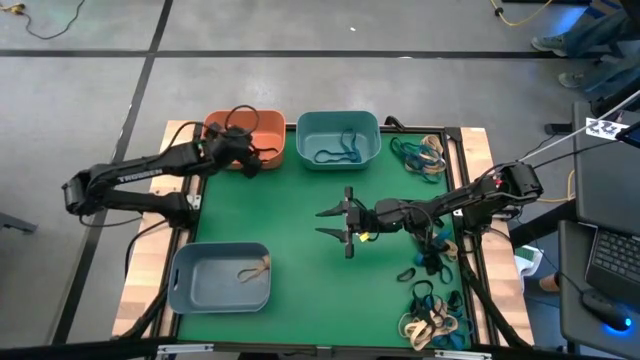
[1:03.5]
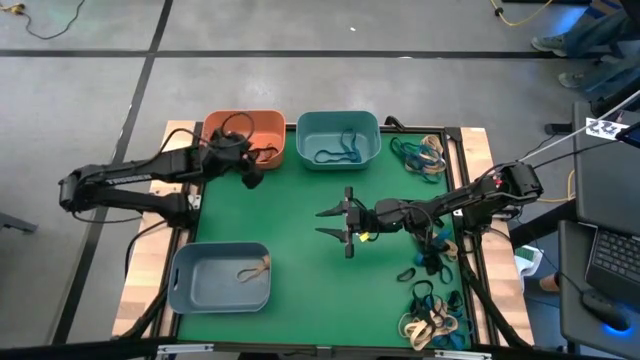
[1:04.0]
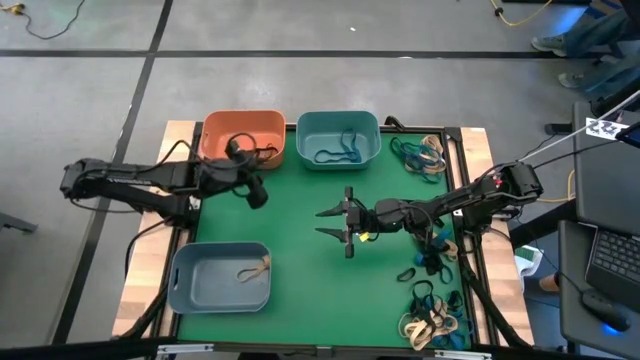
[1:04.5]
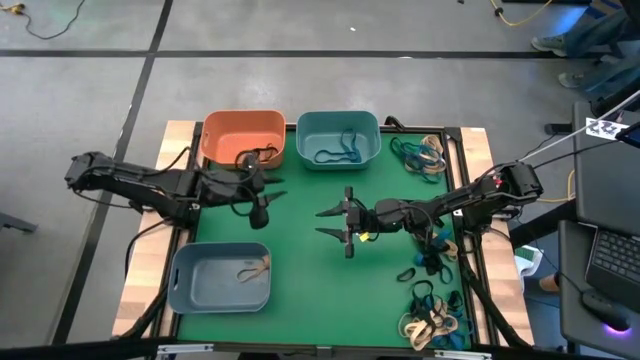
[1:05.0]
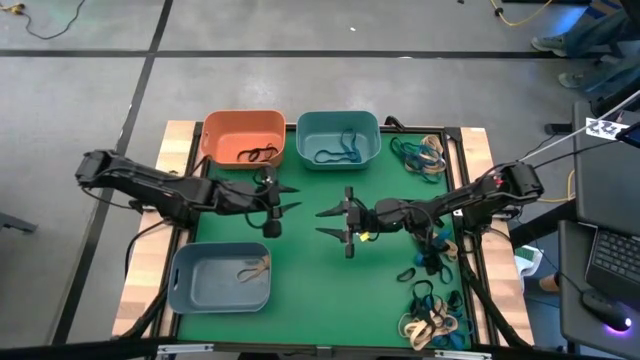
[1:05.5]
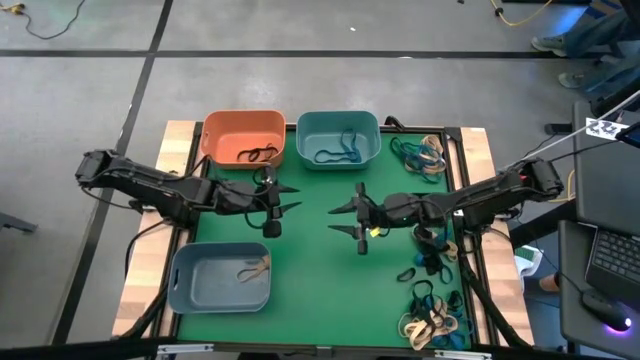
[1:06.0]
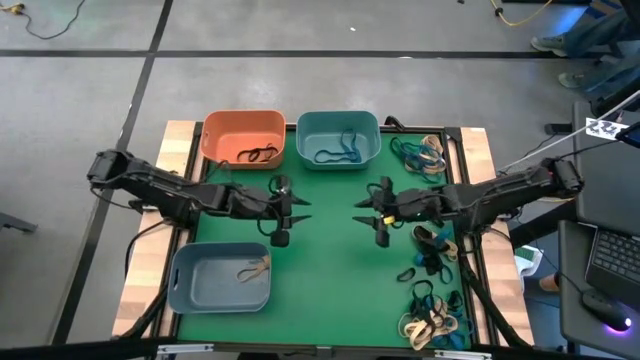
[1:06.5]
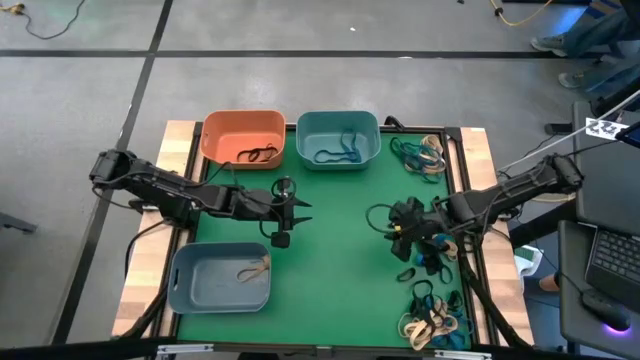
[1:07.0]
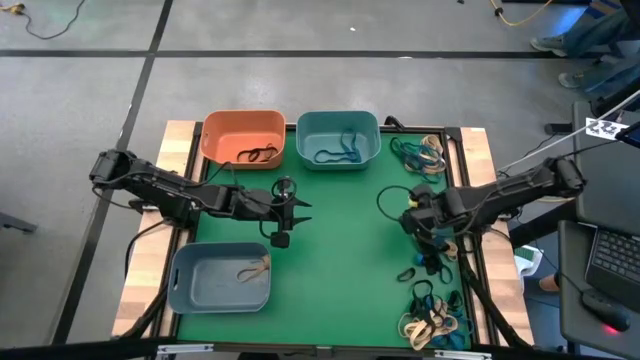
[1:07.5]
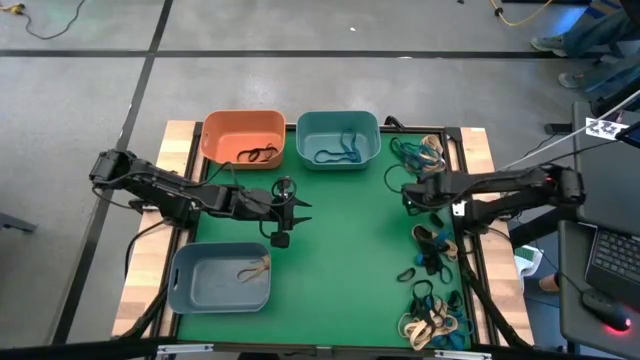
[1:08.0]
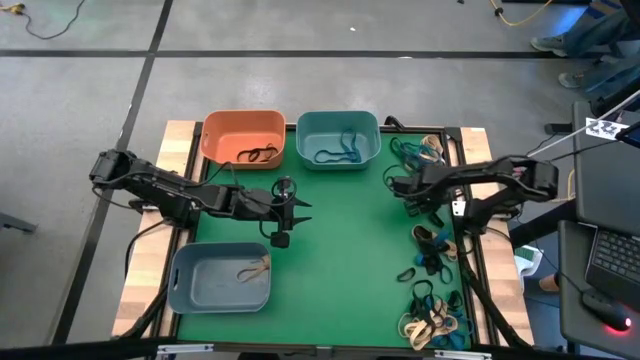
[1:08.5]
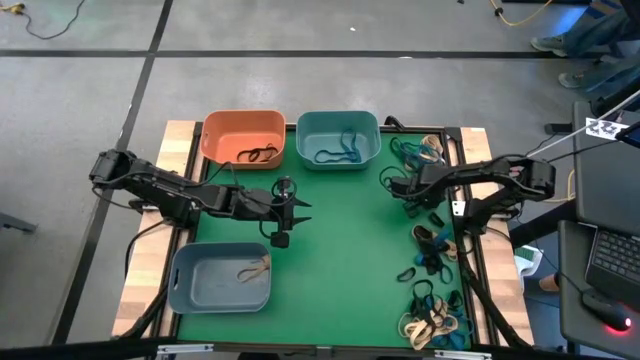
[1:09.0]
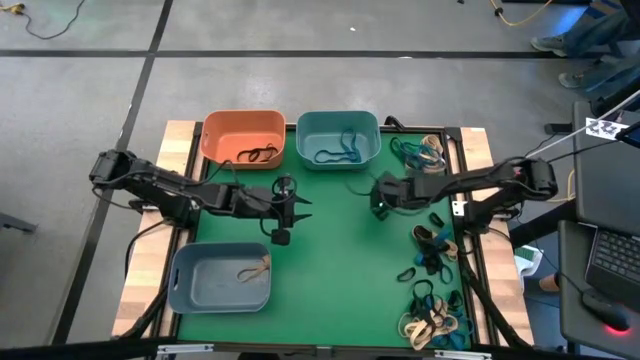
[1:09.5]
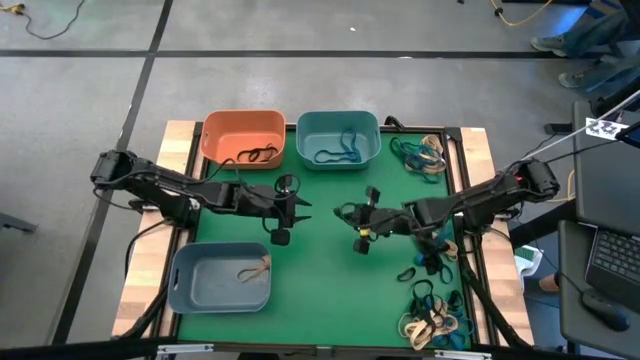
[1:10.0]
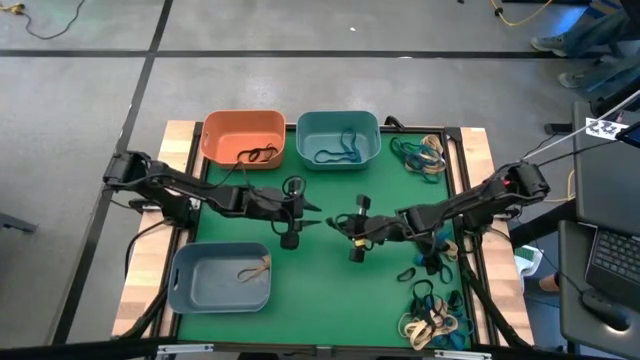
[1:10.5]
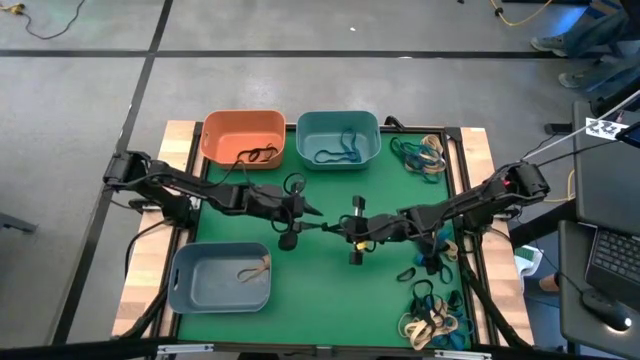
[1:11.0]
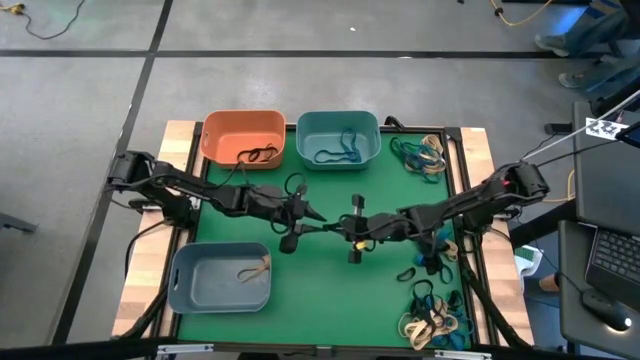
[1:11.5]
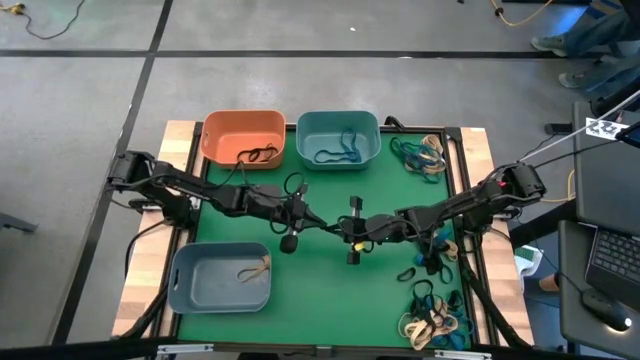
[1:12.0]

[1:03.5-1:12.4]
Task: Sort rubber bands into baskets
Put the small black rubber band into the orange bin

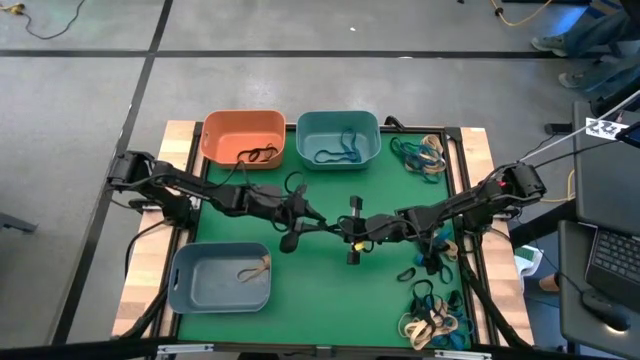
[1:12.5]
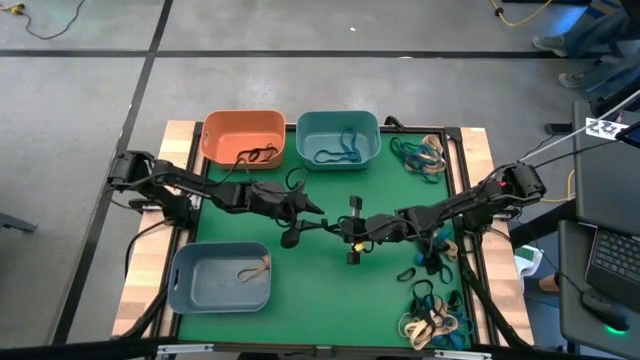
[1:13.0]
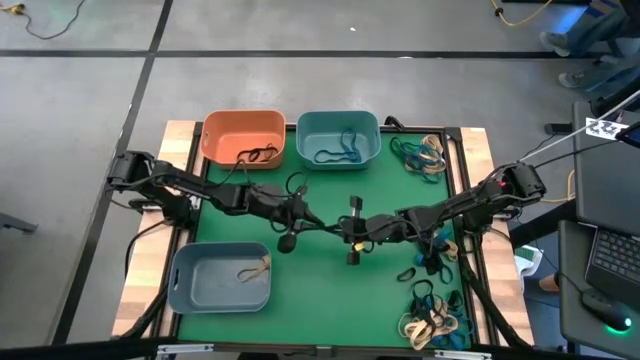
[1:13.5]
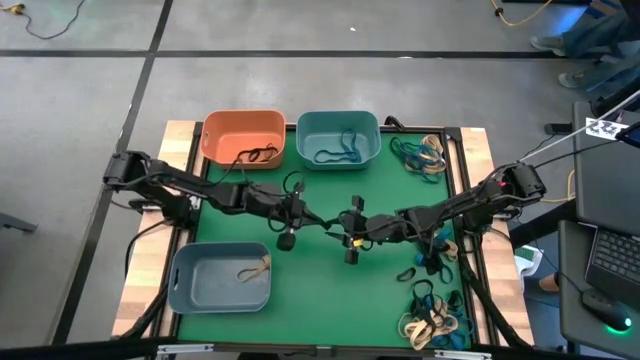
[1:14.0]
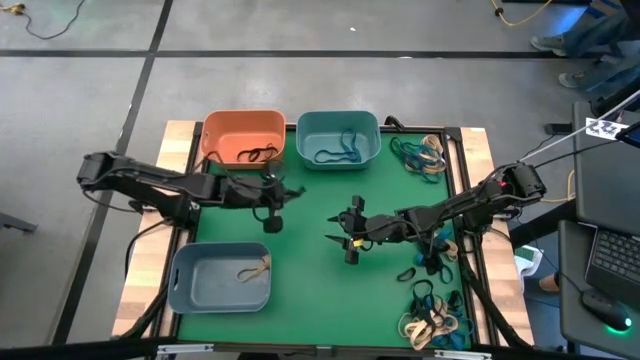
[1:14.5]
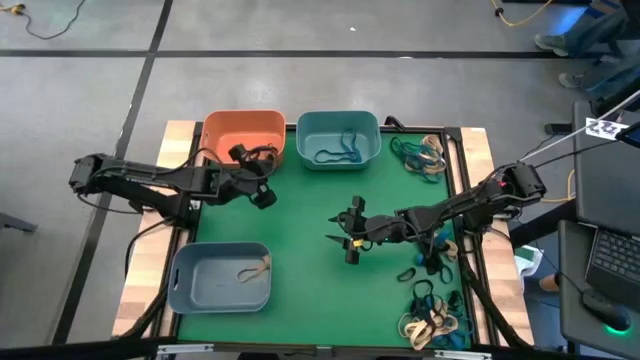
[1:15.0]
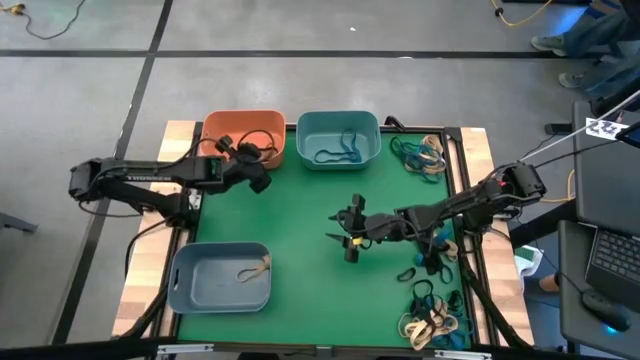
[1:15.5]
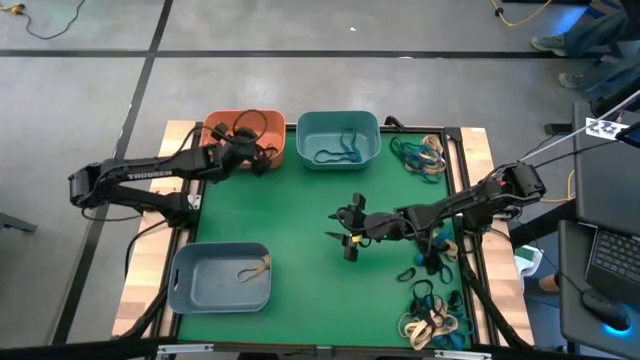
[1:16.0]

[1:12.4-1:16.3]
Put the small black rubber band into the orange bin

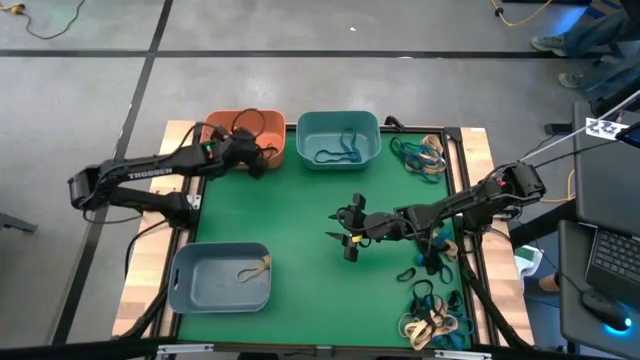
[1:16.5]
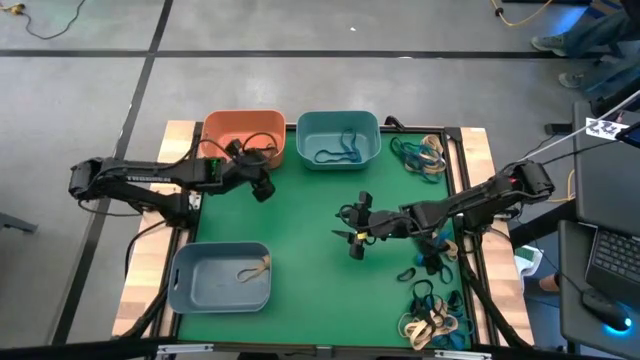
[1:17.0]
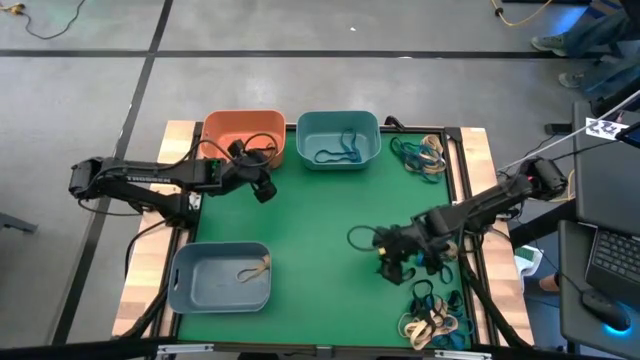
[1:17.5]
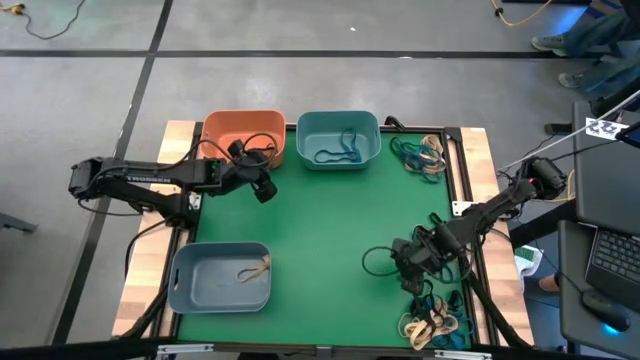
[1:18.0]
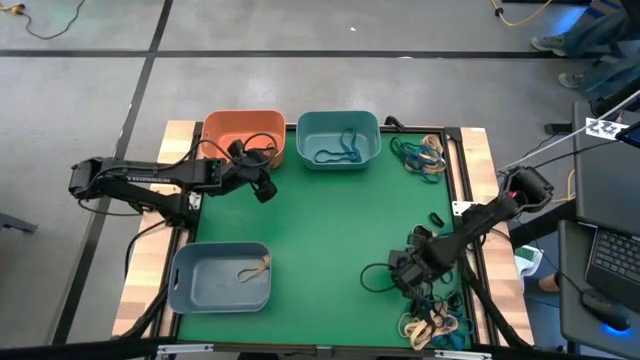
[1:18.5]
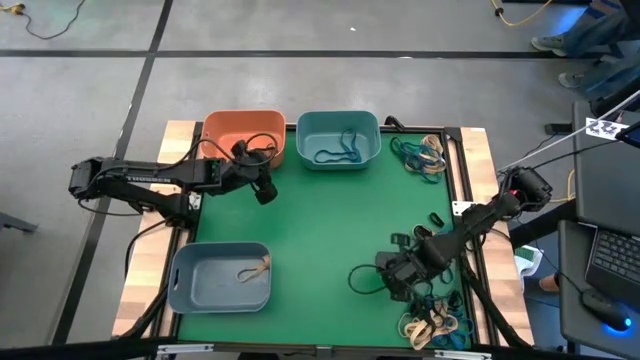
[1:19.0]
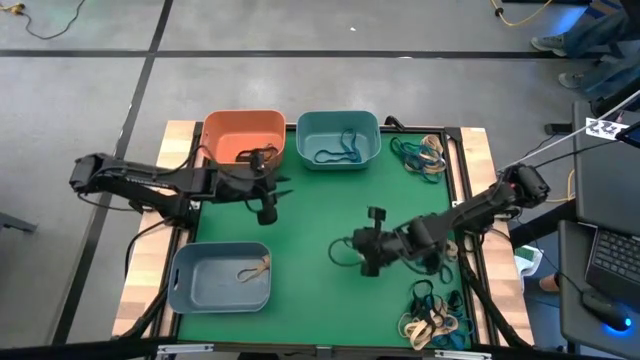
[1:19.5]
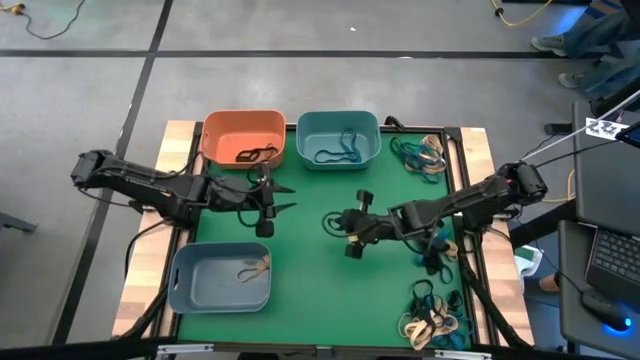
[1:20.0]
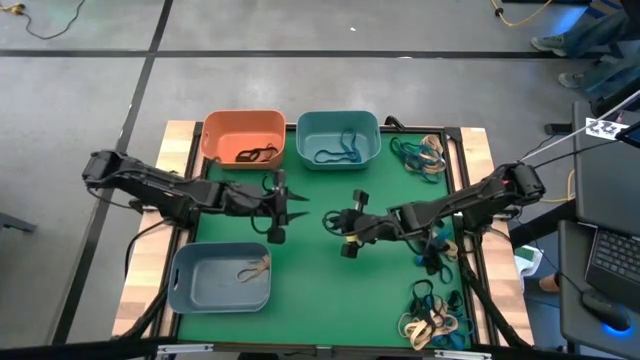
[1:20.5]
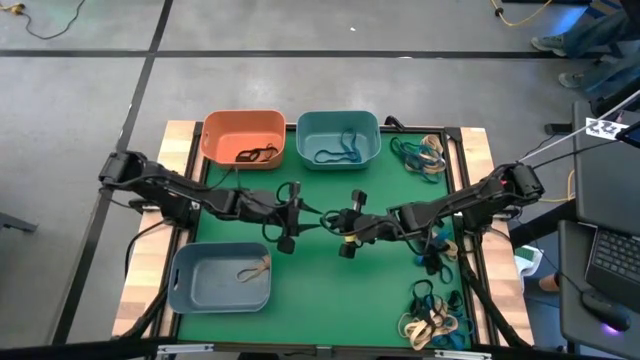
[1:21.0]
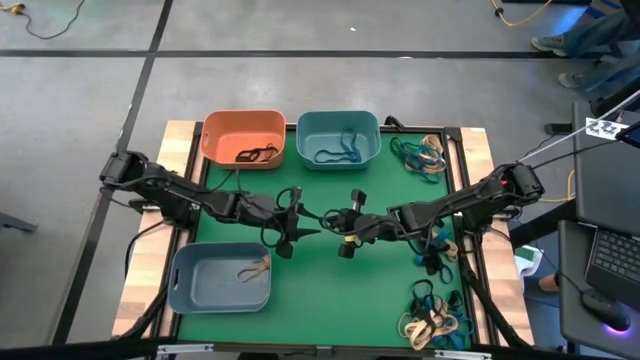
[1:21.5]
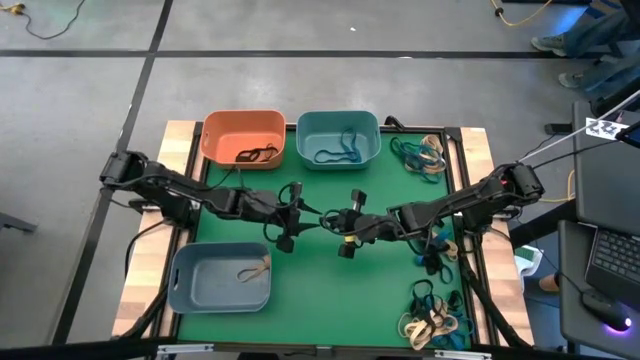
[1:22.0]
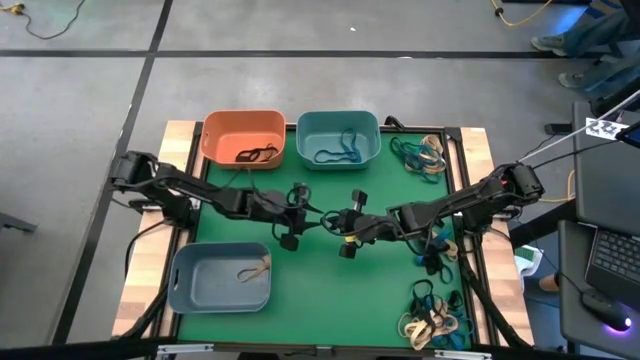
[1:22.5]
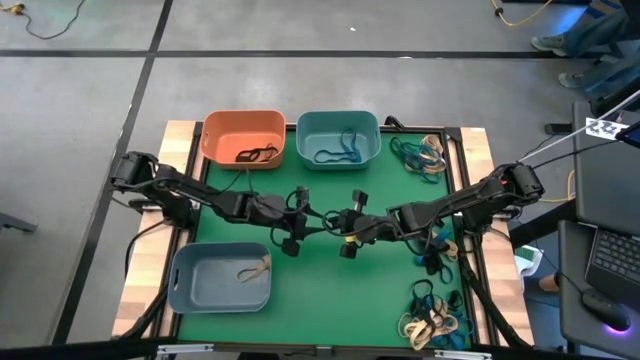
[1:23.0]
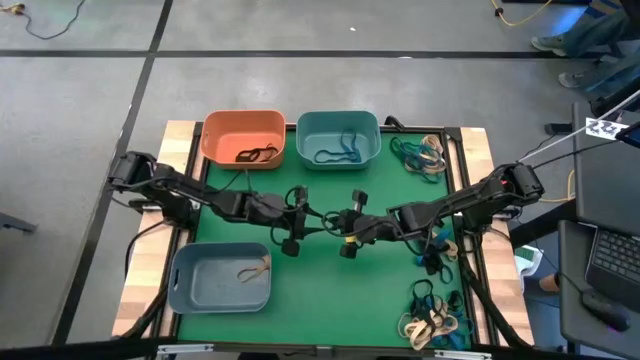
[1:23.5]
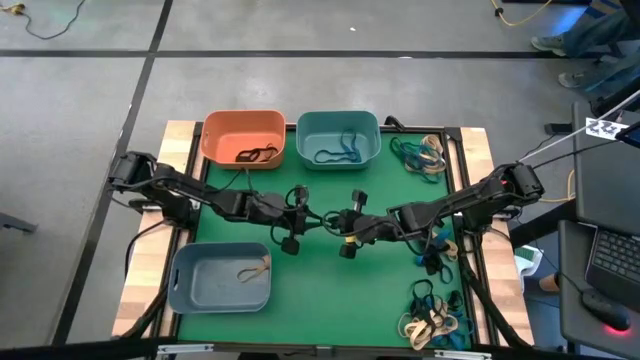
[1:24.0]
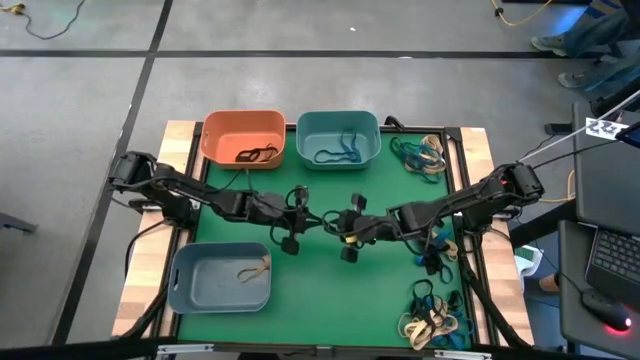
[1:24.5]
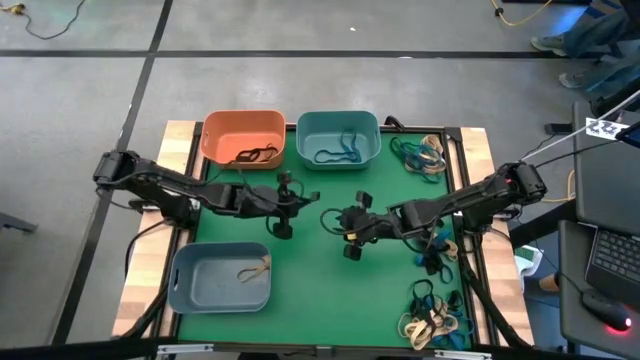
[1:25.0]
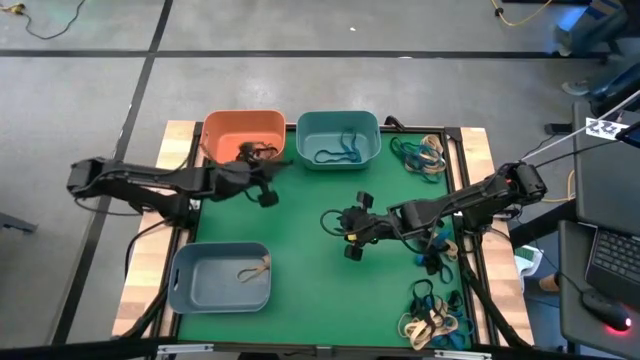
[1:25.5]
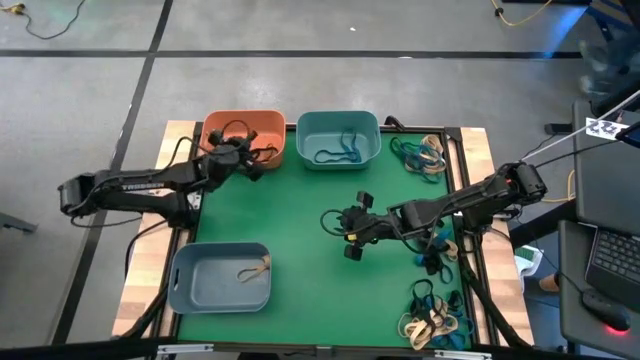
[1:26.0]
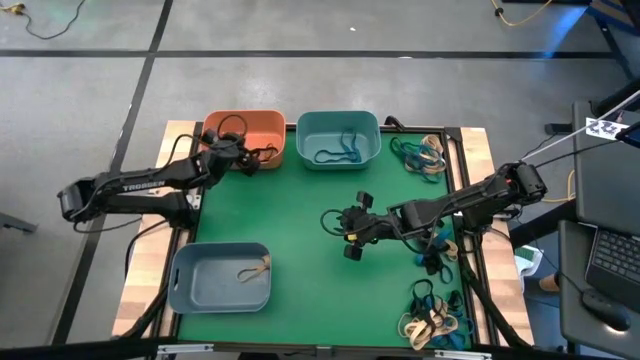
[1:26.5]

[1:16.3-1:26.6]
Put the small black rubber band into the orange bin
